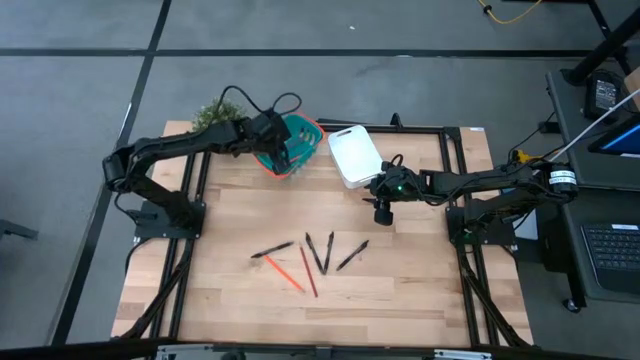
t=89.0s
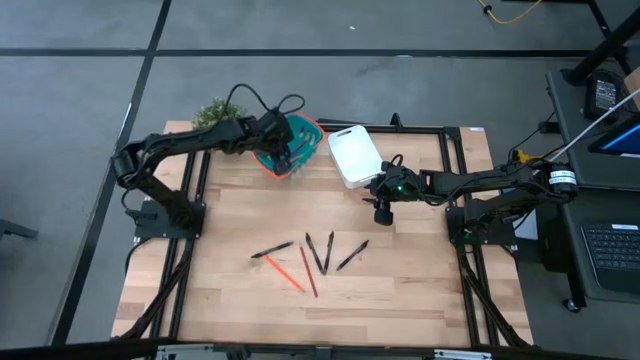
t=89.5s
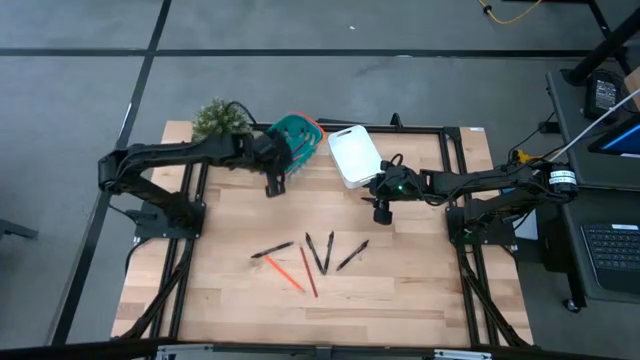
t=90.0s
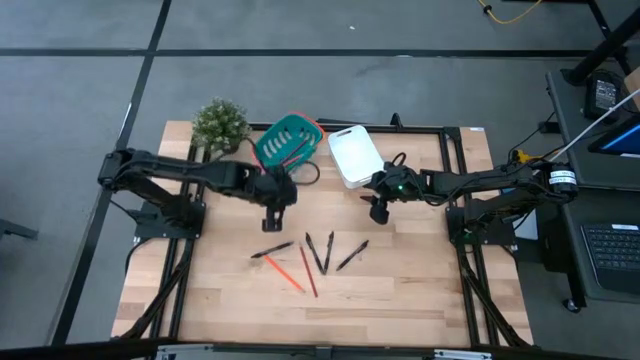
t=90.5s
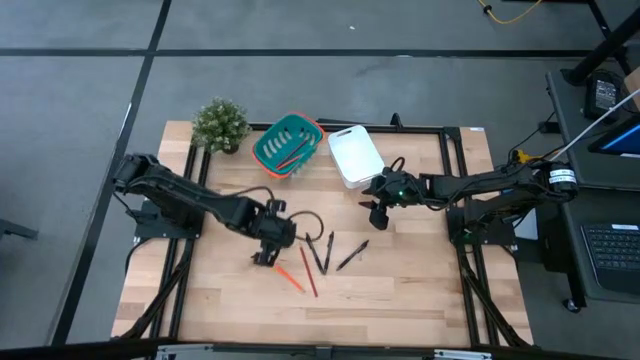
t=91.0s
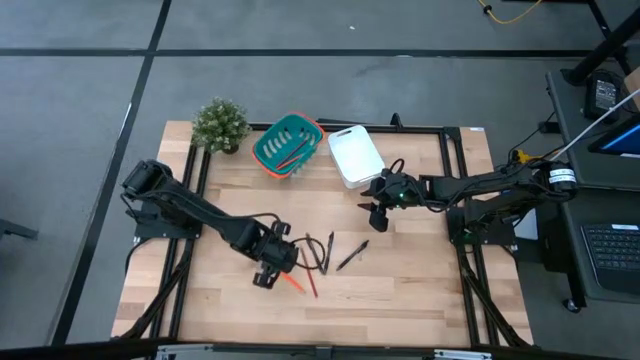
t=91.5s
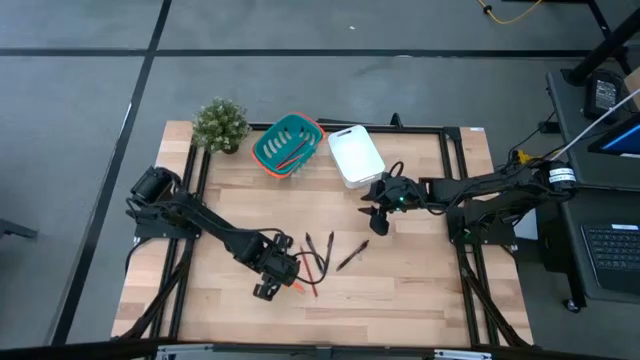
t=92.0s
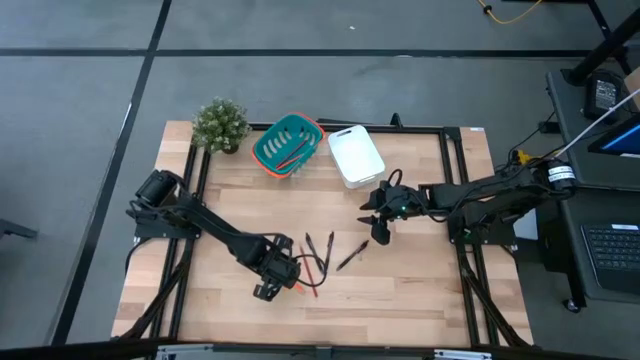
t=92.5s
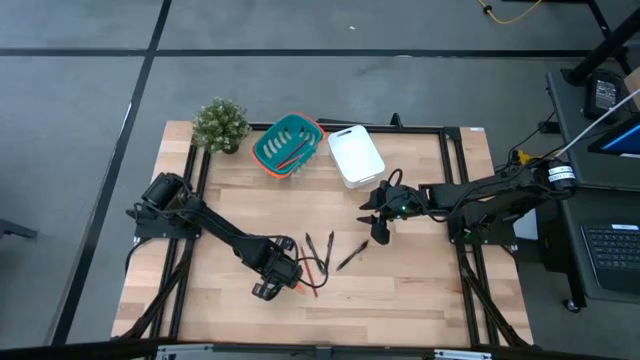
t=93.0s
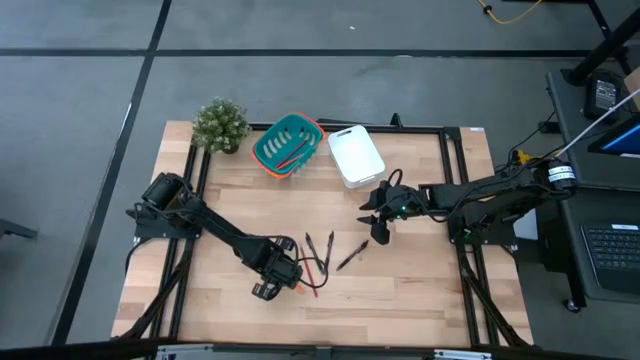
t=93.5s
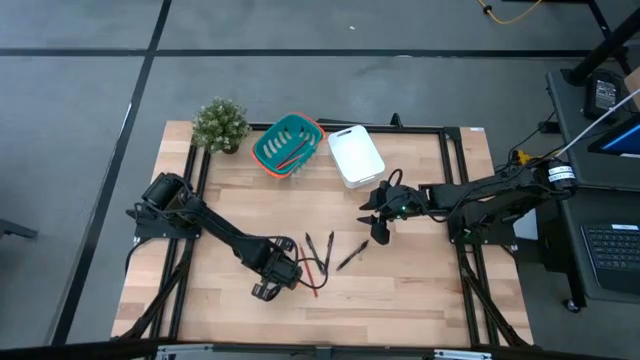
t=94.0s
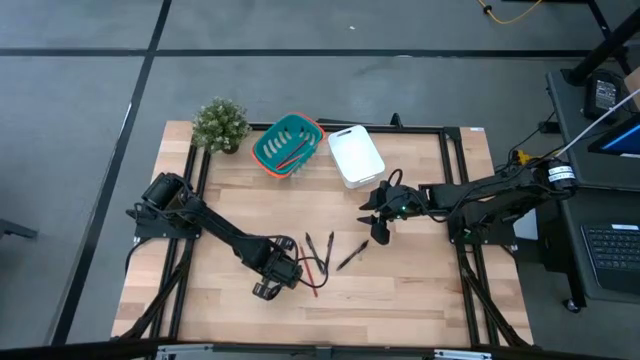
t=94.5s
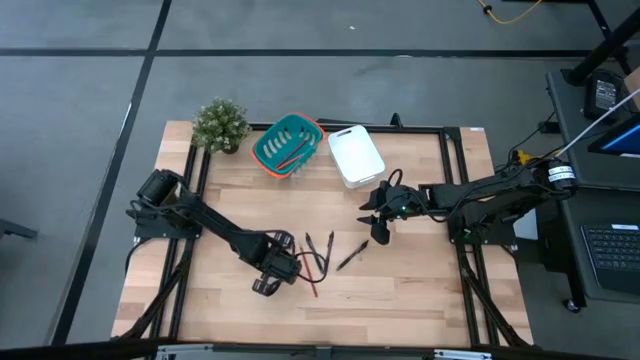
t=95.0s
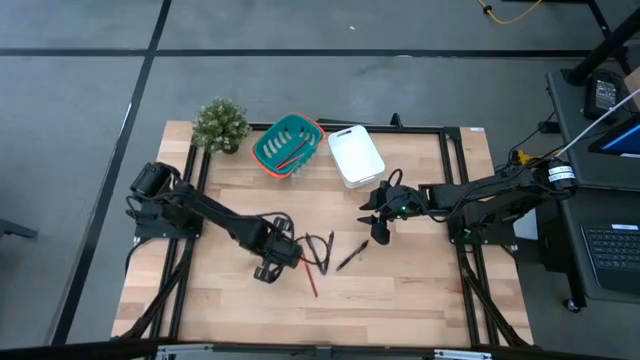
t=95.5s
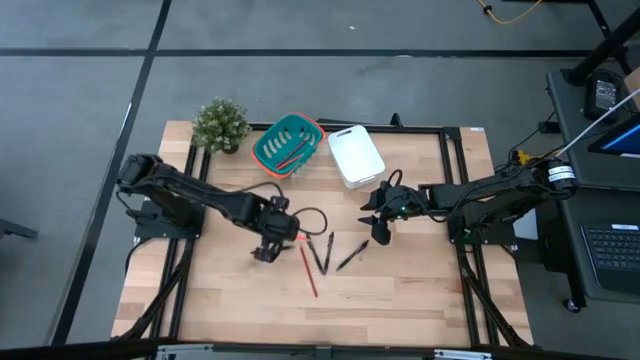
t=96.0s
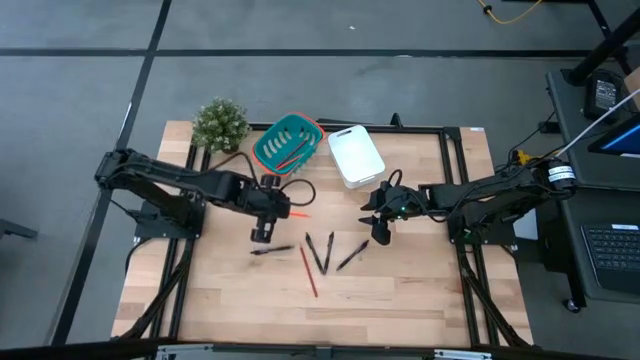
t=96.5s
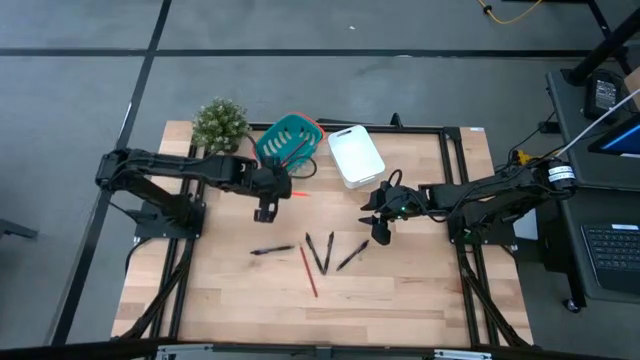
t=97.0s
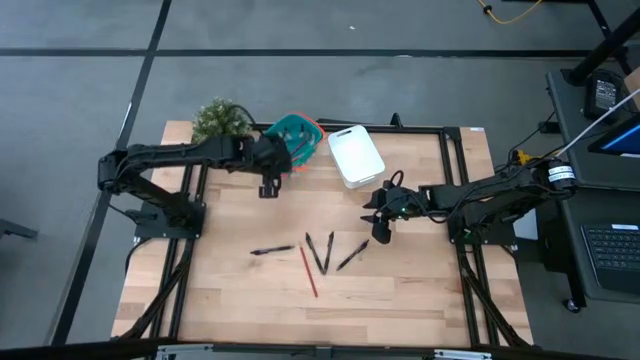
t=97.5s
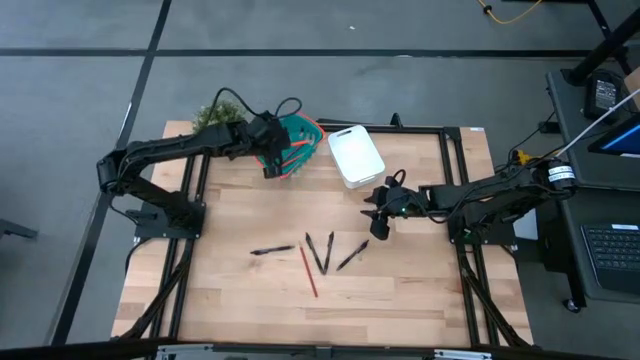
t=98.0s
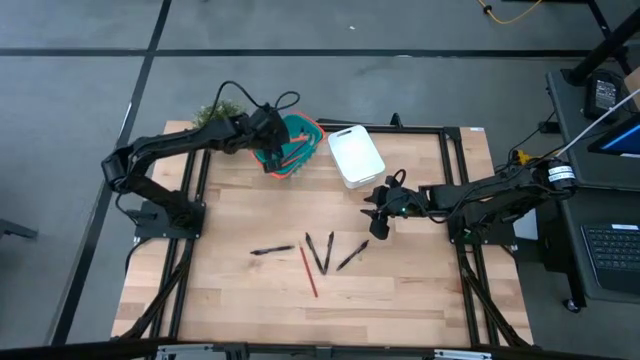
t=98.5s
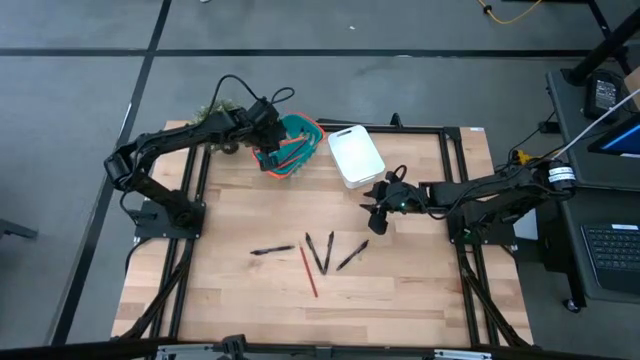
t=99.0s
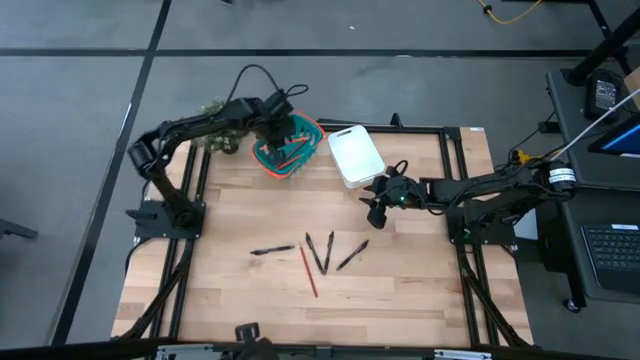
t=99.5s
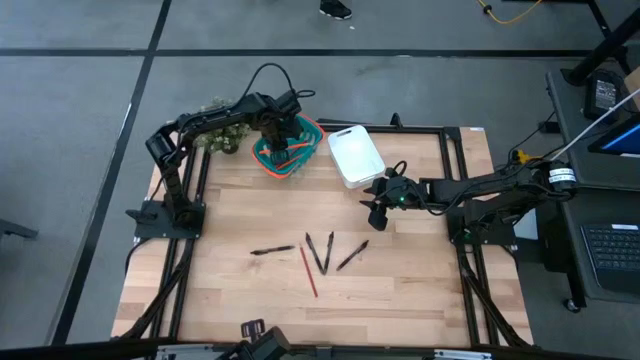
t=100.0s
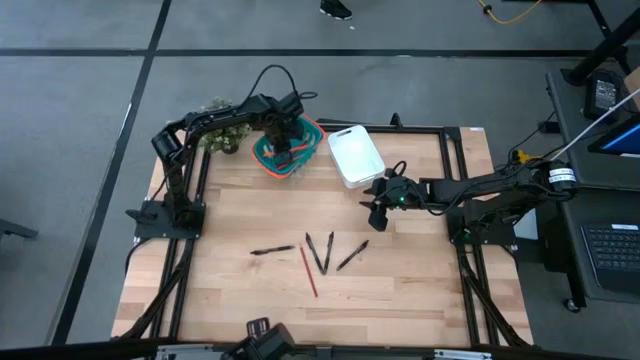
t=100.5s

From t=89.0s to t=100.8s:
Task: Sort pens & pencils
Put the orange pencil into the green basket

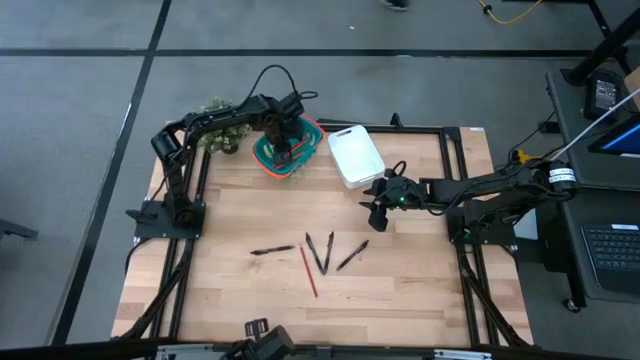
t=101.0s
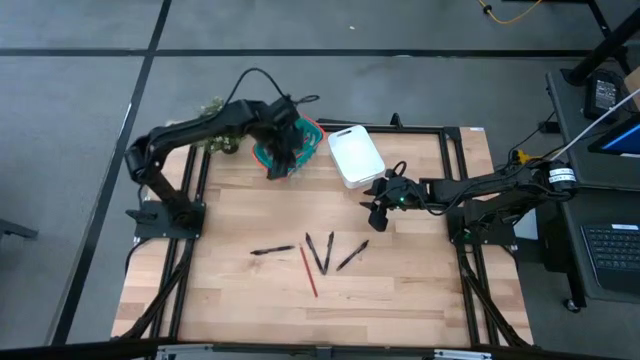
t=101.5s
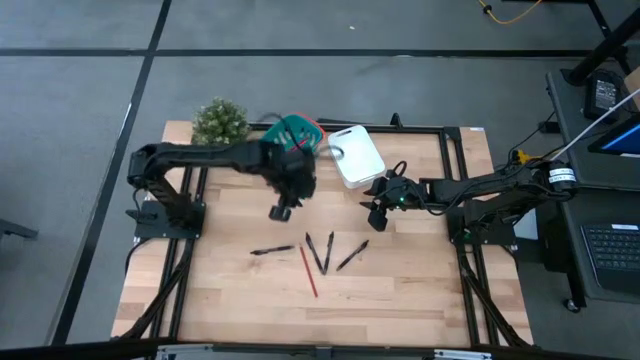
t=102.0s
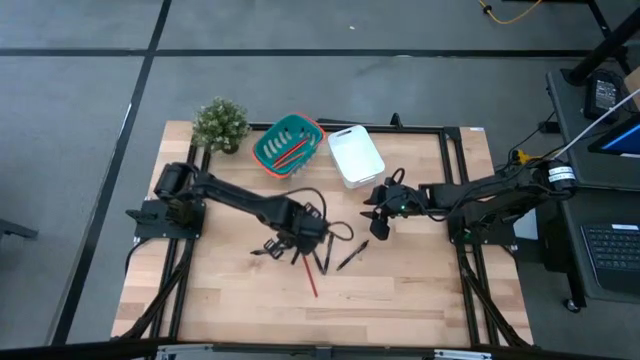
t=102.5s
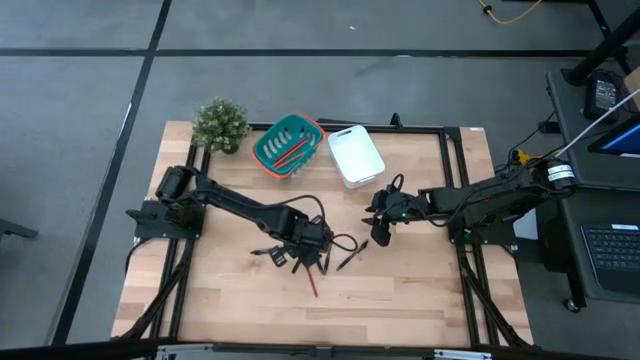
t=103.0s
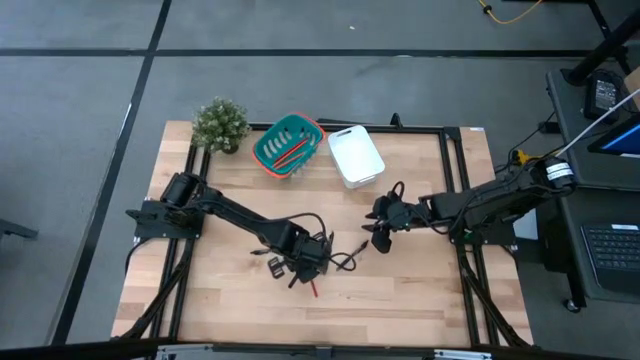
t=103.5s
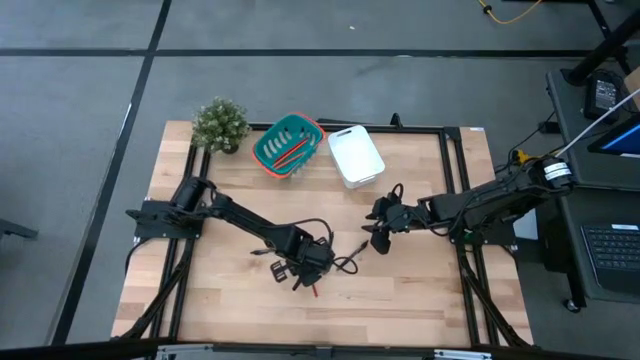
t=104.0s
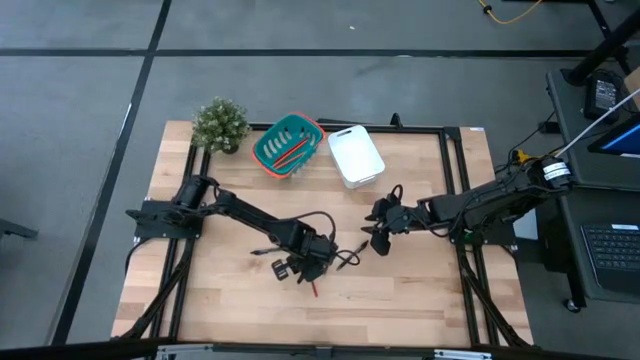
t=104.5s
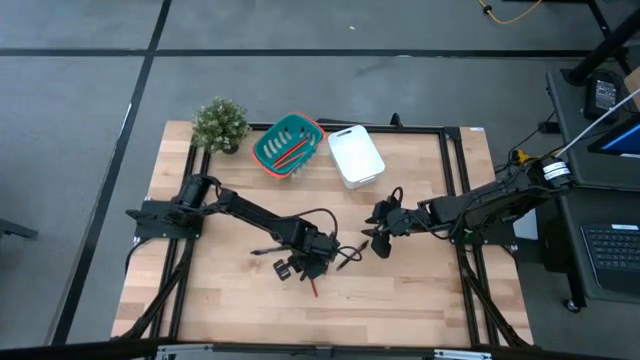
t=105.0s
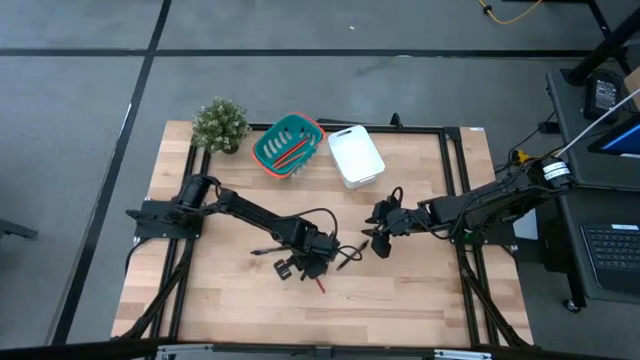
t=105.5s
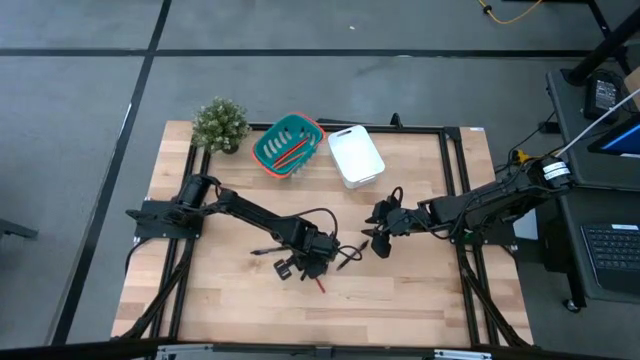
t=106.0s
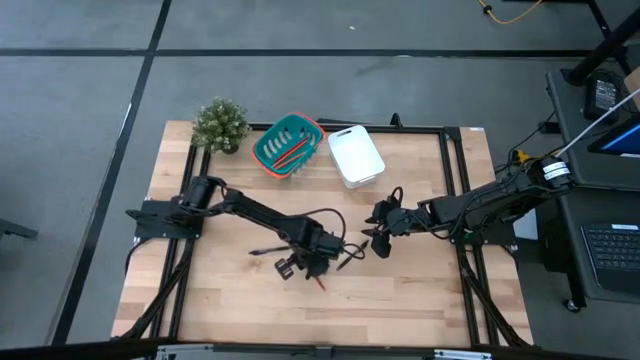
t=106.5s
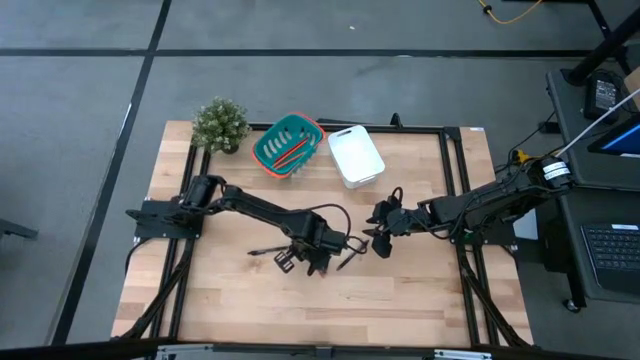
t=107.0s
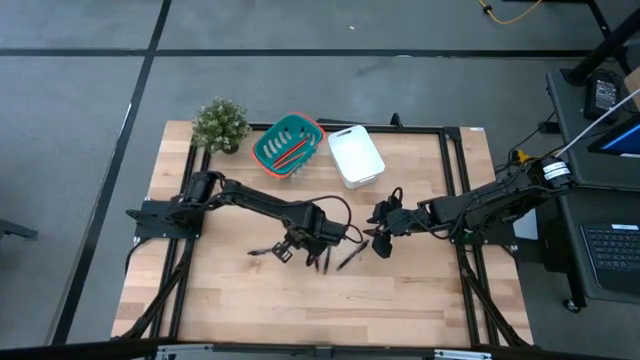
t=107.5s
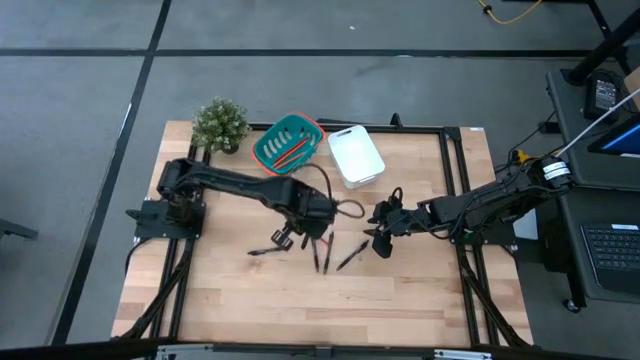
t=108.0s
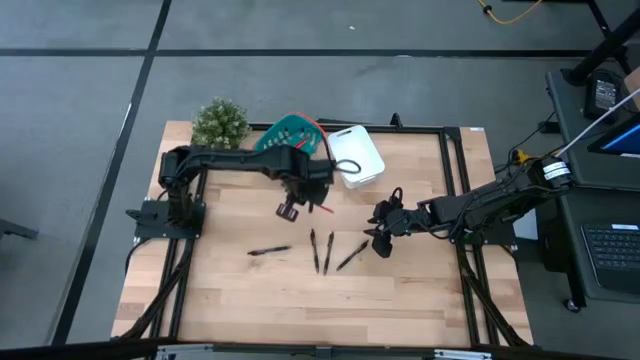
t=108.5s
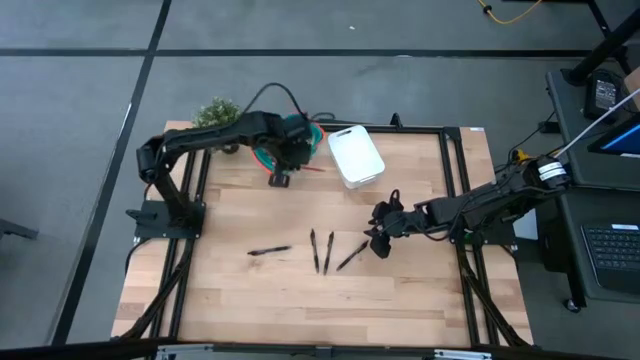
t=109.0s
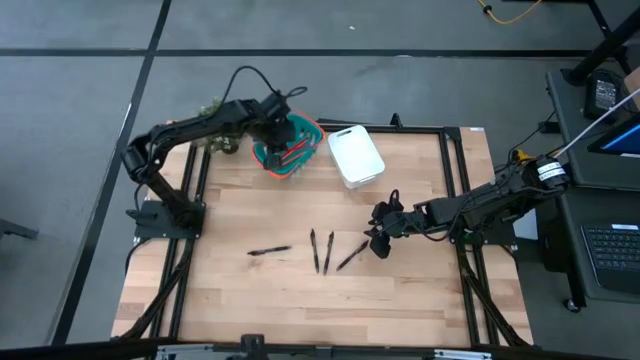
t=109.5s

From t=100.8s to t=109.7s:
Put the red pencil into the green basket

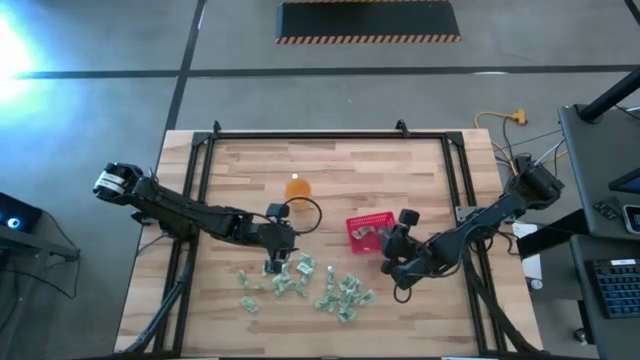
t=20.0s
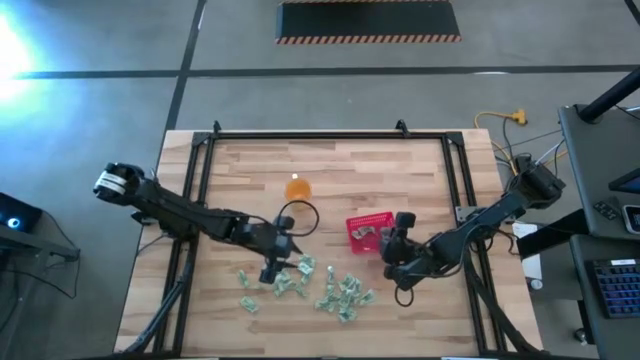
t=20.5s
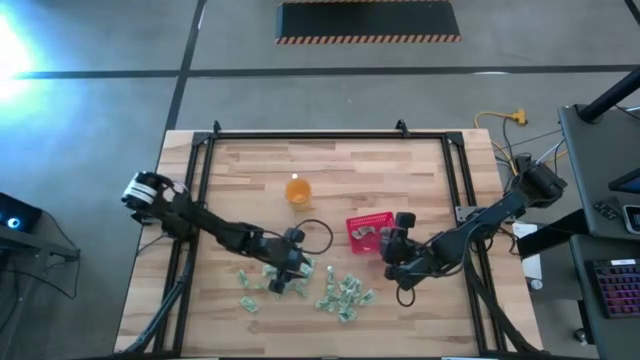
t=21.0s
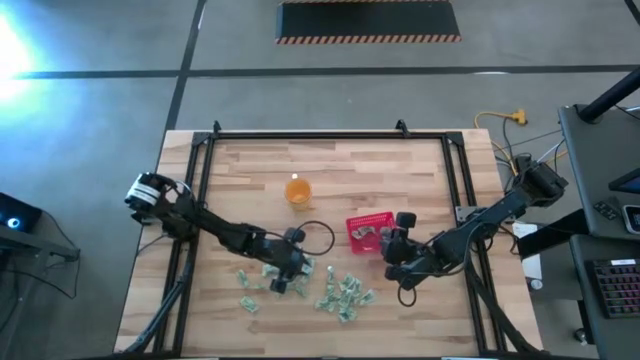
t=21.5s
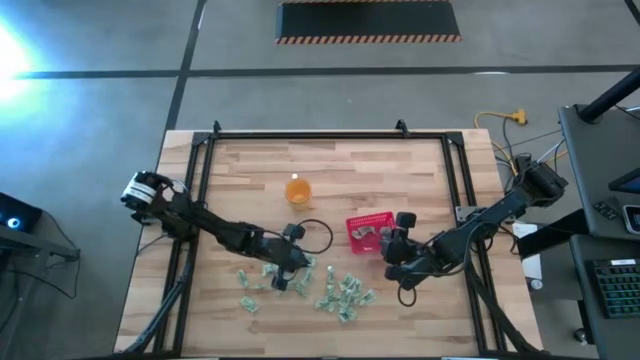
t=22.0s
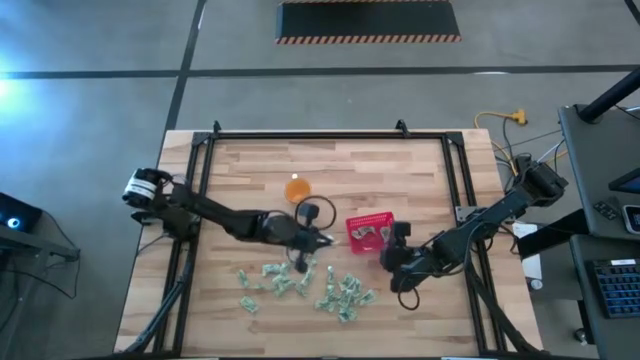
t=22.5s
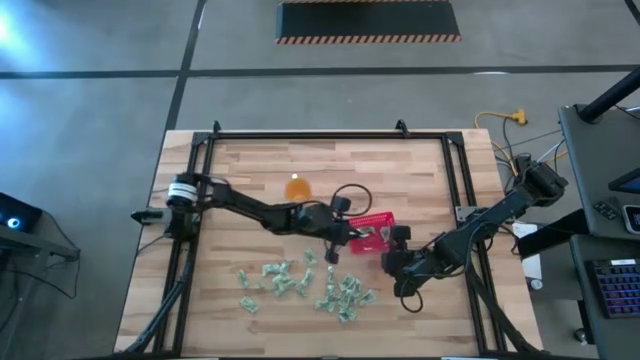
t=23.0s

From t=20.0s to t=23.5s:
Task: Pick and place Stevia / Truvia into bins
Put the stevia packet into the basket
